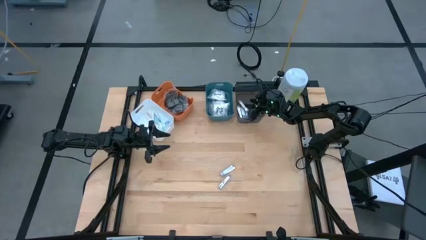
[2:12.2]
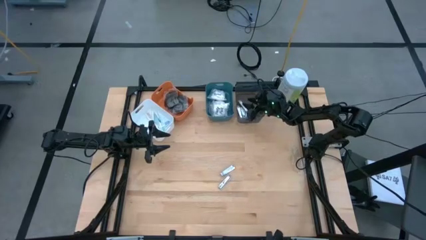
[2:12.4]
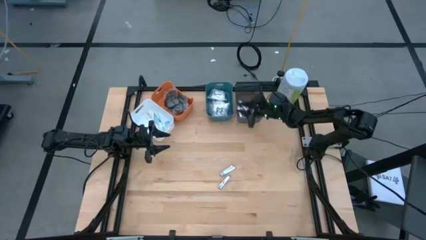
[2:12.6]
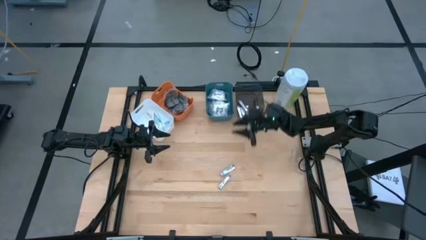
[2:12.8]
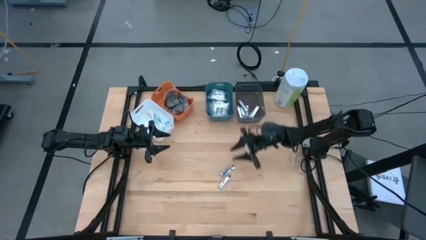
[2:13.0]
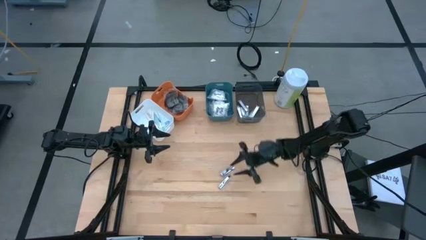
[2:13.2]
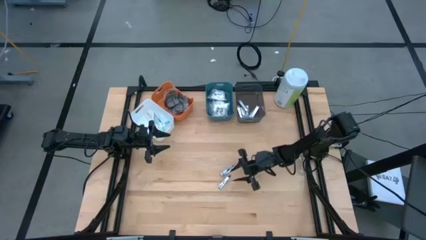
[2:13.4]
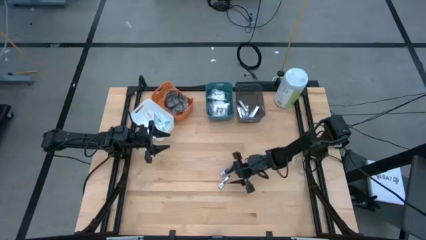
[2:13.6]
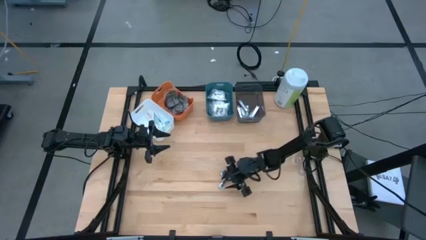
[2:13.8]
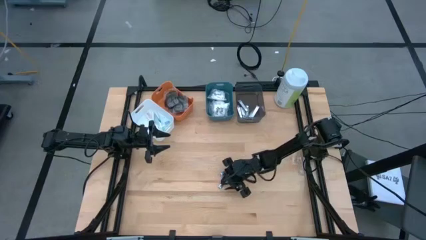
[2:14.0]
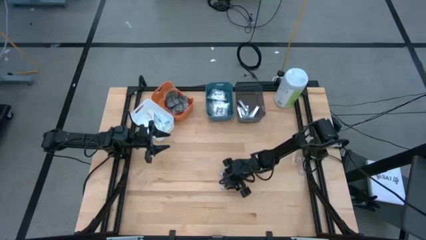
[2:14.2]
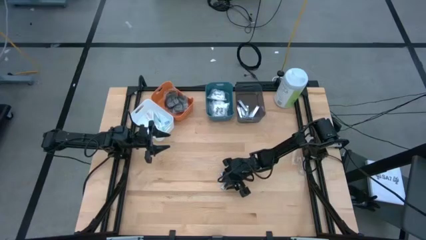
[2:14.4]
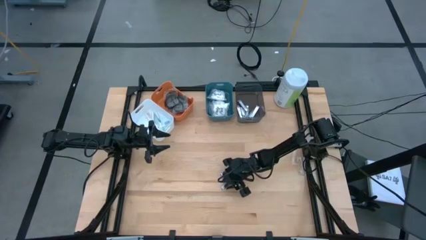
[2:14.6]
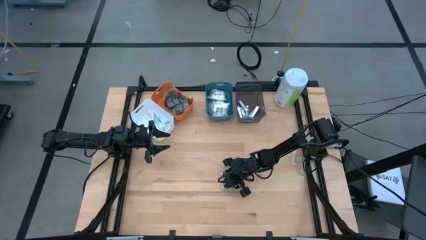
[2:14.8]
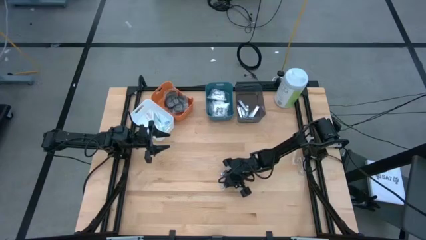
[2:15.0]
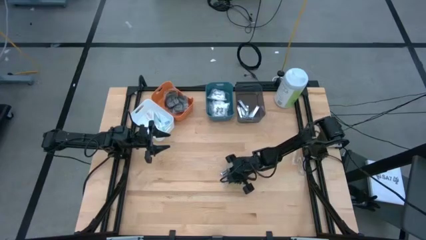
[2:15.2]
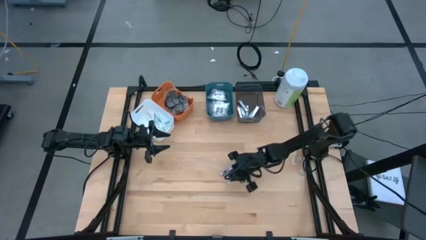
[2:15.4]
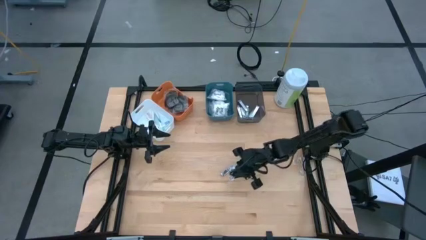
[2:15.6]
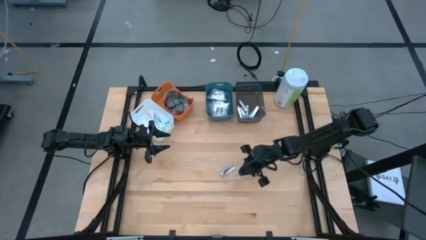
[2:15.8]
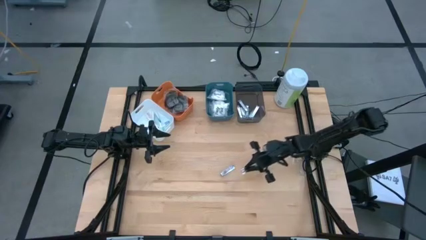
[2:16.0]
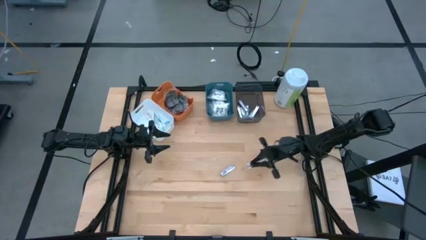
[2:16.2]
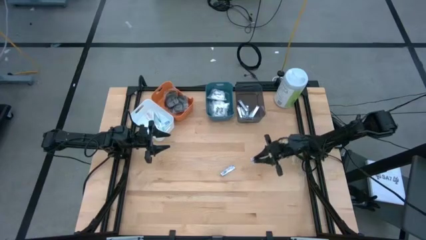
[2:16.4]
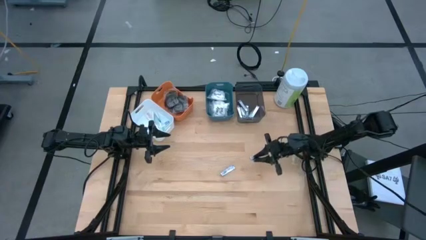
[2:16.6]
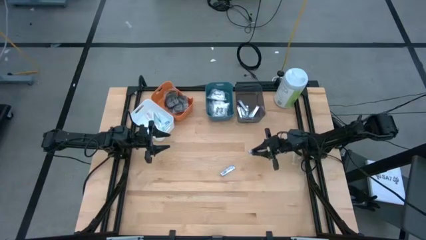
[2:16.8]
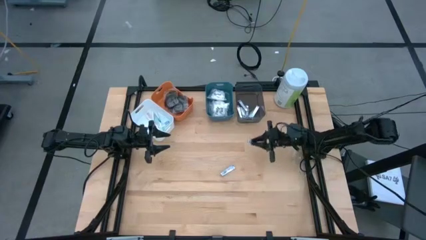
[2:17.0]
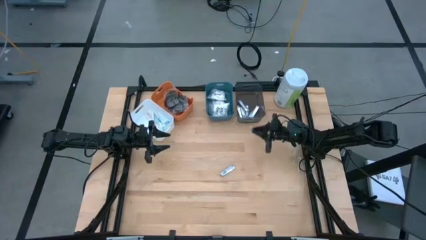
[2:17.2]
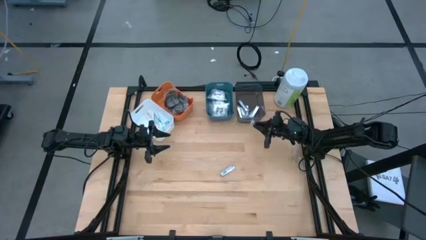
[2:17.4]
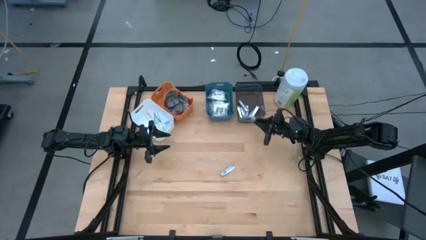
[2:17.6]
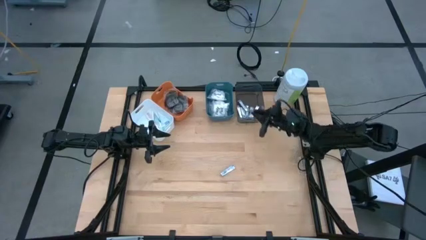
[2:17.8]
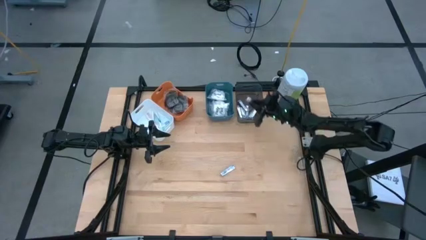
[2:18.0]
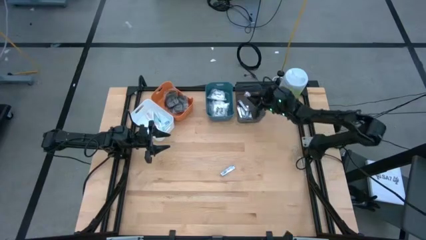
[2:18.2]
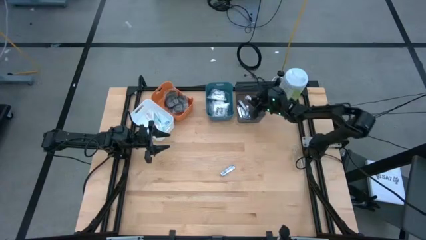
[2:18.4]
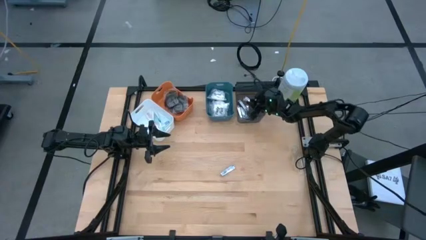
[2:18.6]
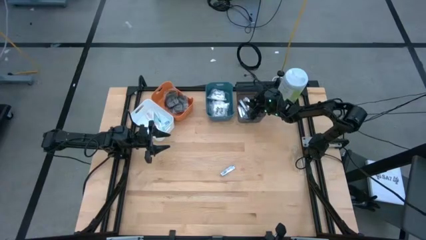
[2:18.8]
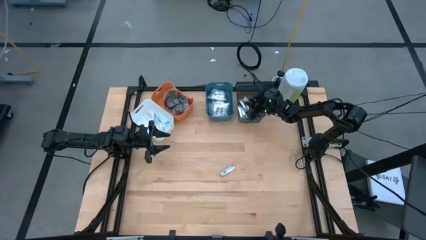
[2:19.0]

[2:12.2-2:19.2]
Task: Pick & Place Travel size toiletries
Put the silver nail cutter into the black bin

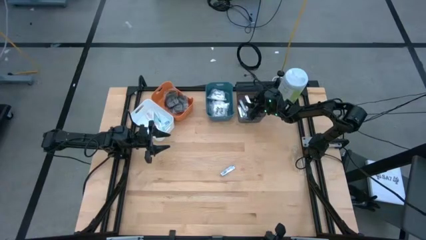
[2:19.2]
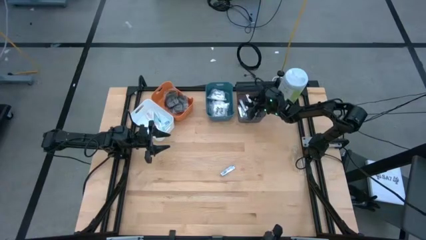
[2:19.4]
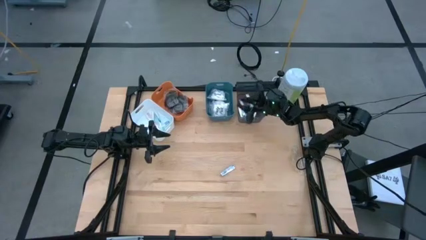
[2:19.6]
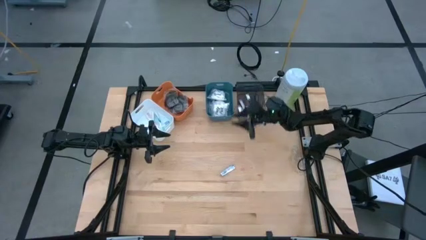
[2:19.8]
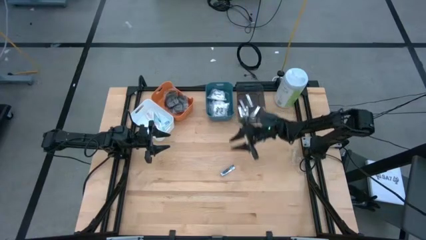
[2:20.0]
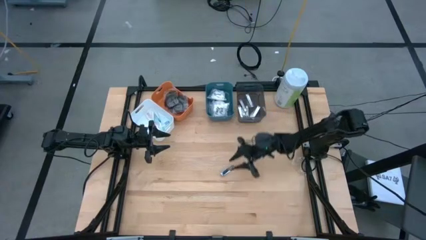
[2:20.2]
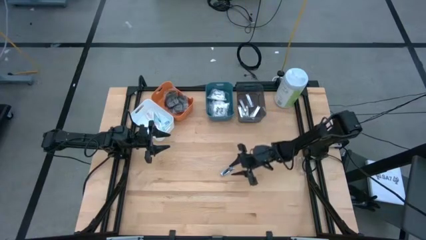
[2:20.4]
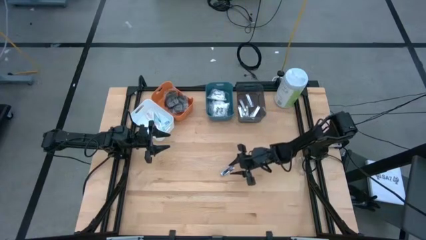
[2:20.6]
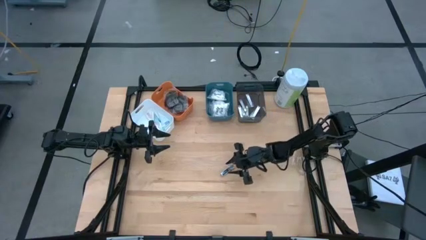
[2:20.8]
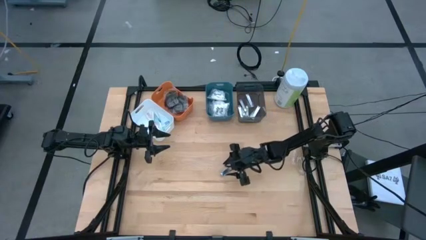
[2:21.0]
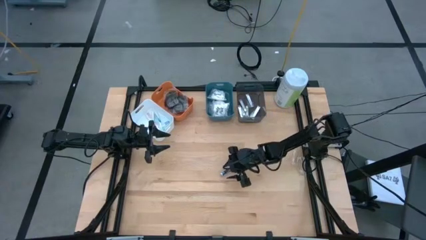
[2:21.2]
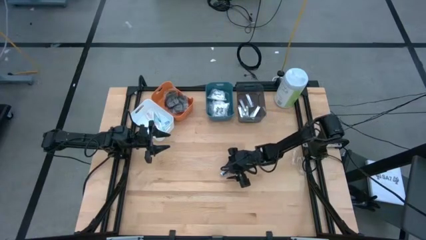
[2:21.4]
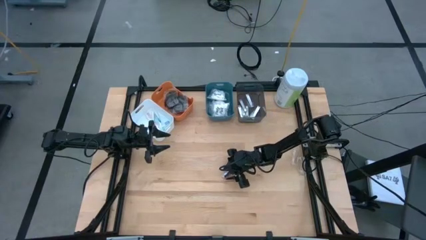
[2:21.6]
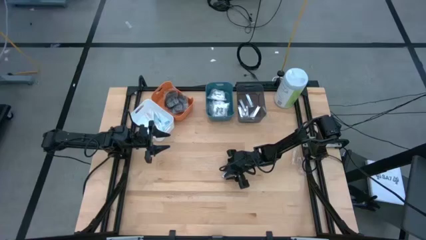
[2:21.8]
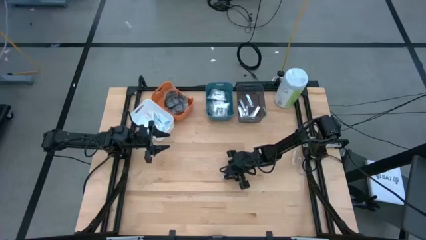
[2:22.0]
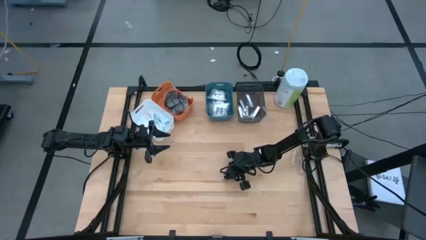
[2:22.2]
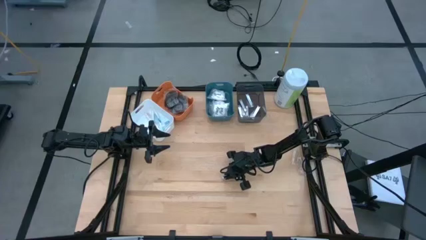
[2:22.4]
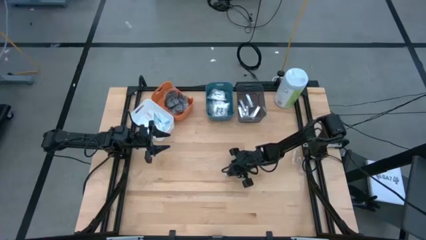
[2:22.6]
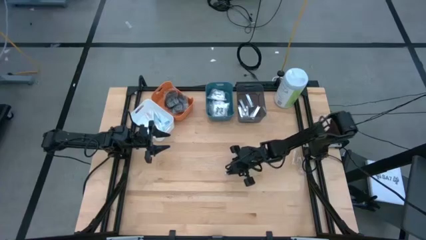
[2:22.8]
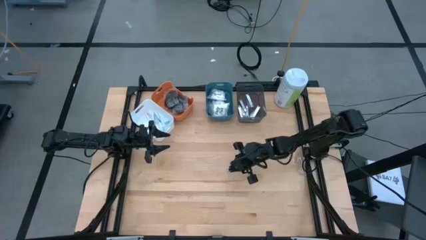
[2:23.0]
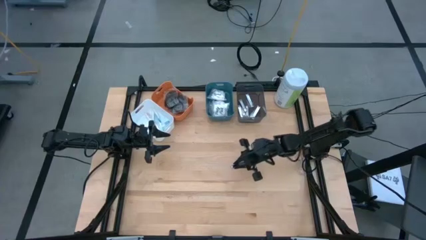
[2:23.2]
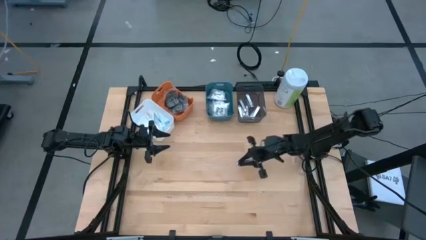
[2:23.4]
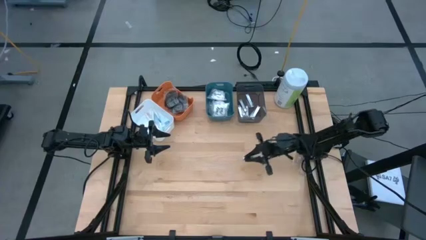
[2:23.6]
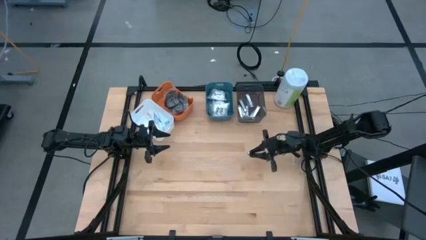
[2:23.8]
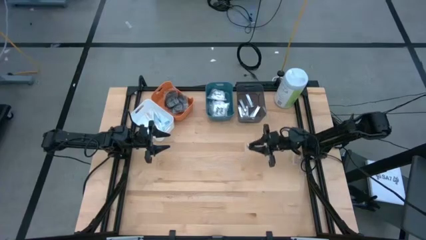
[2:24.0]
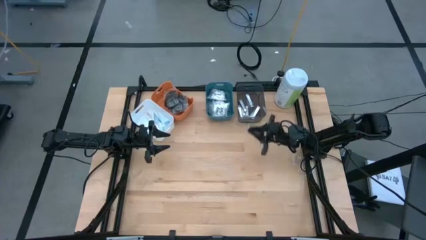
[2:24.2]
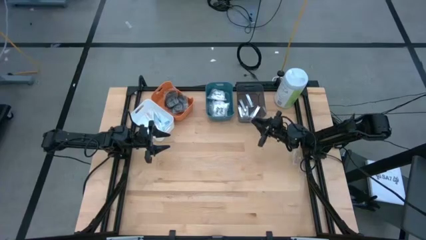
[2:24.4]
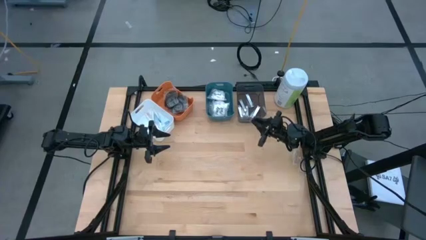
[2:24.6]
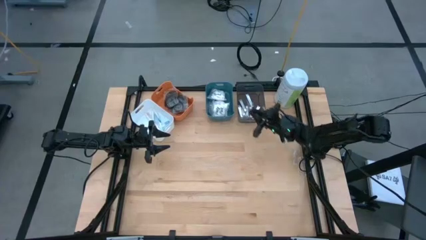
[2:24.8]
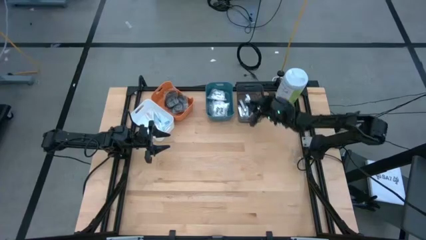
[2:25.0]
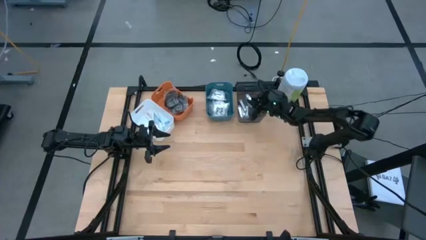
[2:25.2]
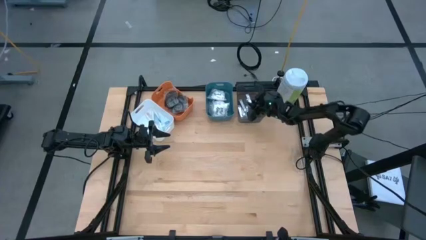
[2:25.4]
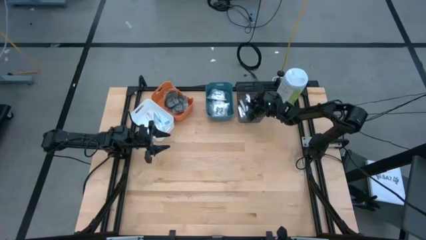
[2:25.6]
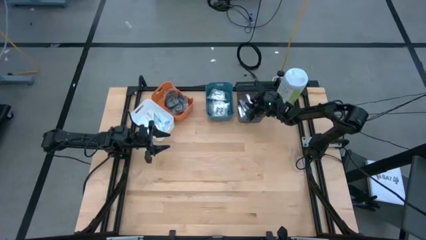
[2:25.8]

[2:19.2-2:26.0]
Put the silver nail cutter into the black bin

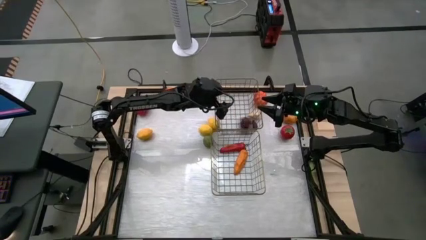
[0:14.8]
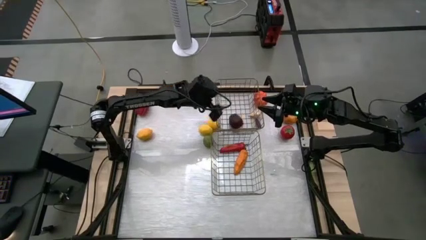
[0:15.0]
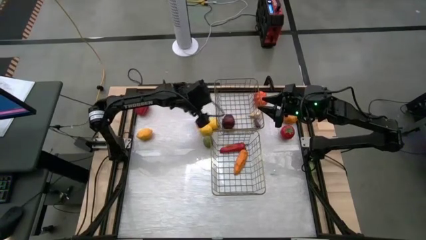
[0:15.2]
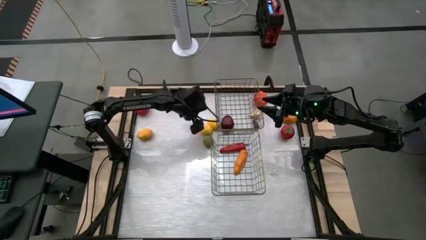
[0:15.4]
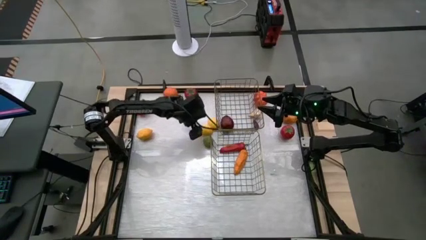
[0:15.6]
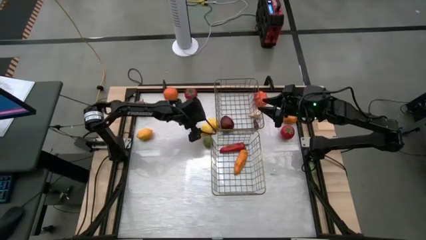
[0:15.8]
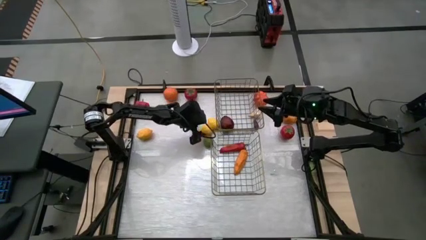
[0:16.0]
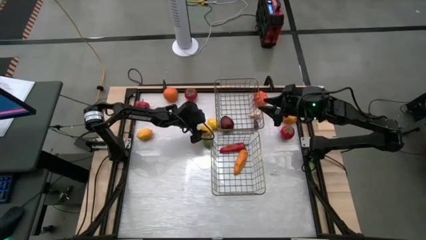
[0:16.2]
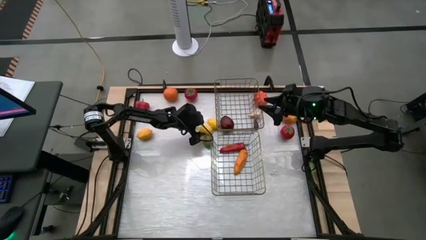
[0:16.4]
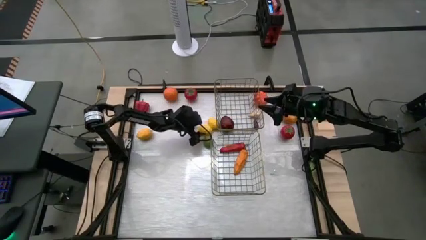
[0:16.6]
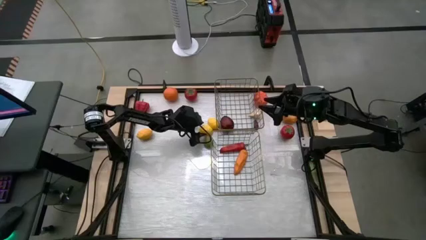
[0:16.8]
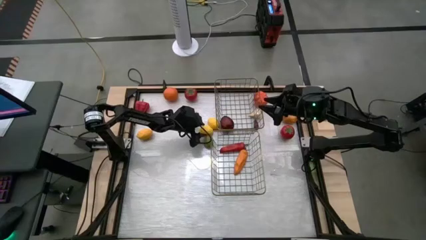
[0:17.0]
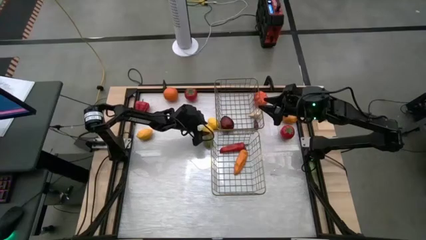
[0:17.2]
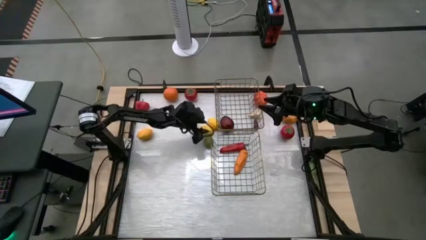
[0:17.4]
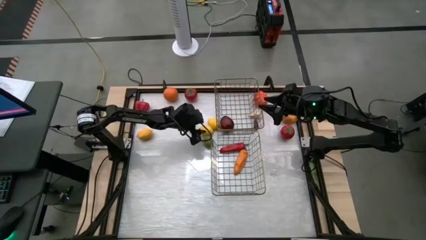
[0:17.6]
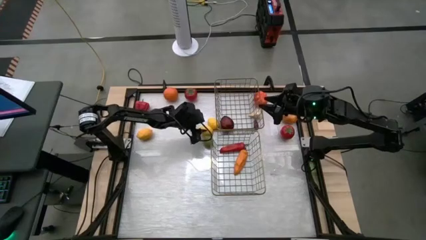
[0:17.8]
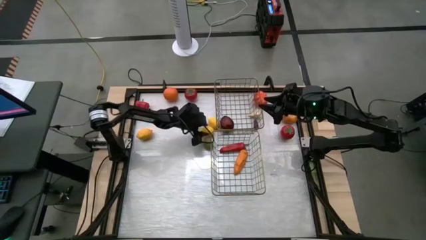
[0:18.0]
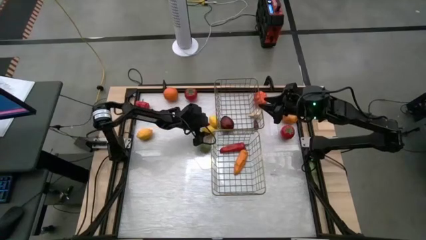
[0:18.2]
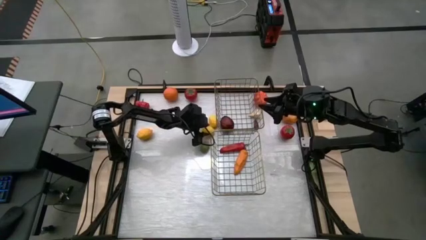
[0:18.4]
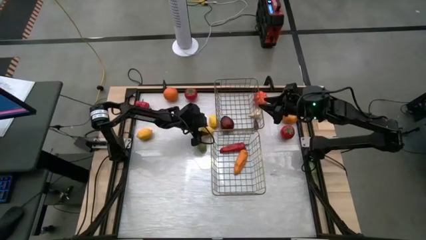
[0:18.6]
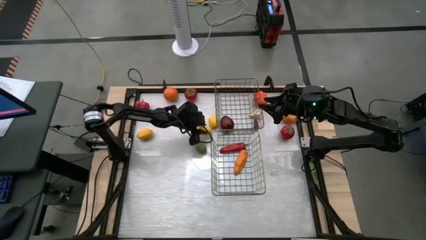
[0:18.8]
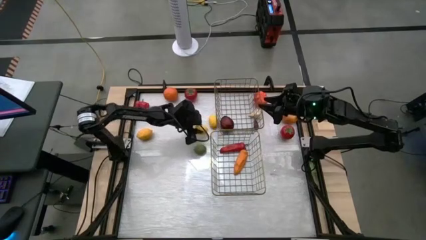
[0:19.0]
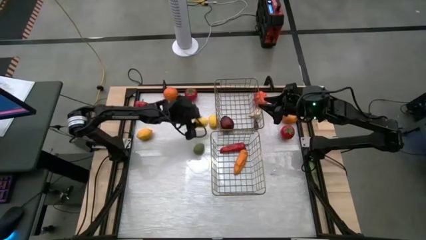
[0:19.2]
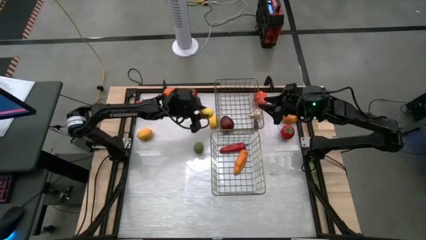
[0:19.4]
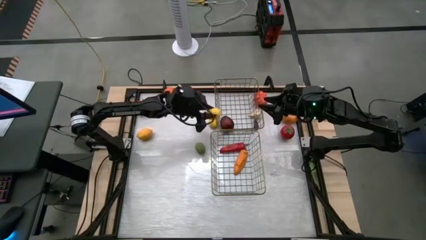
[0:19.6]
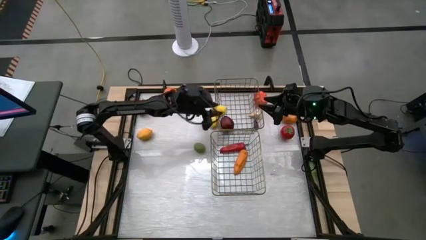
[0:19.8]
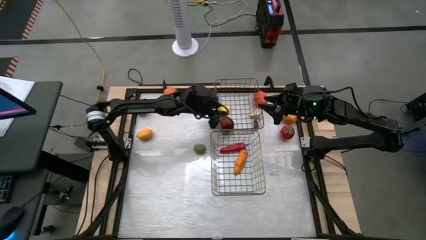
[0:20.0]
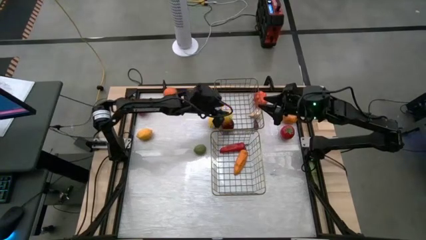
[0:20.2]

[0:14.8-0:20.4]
Task: Sort produce into baskets
Put the middle yellow lemon into the top wire basket
